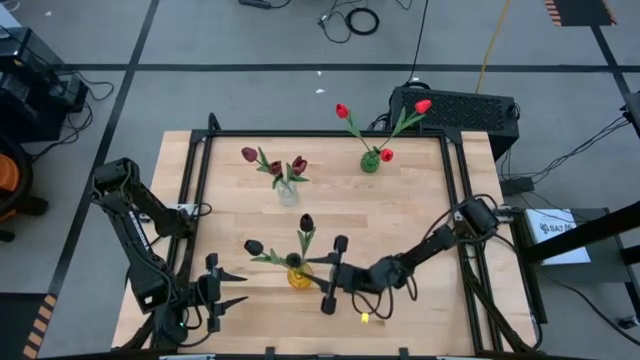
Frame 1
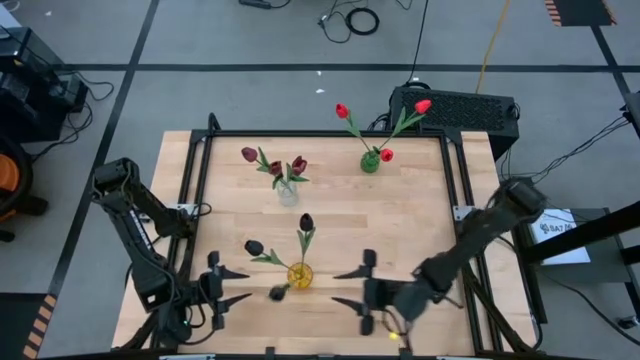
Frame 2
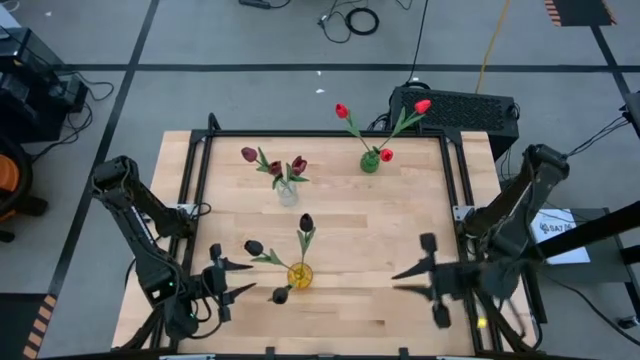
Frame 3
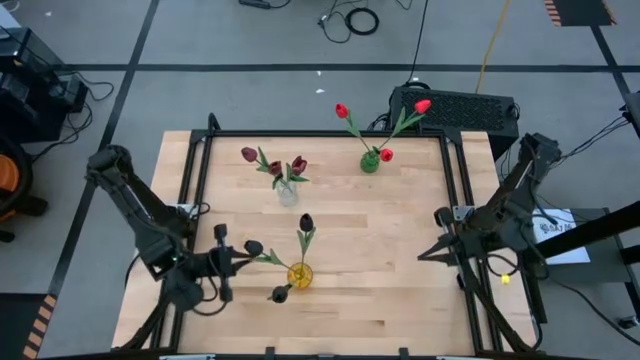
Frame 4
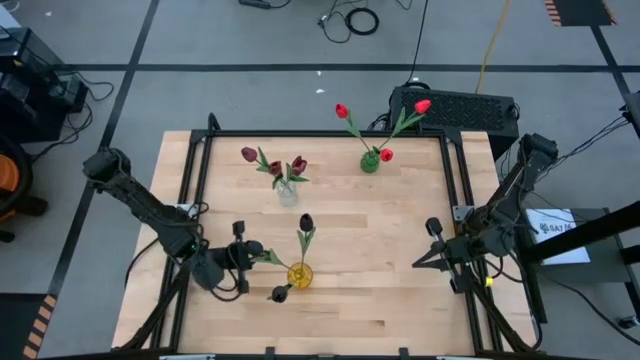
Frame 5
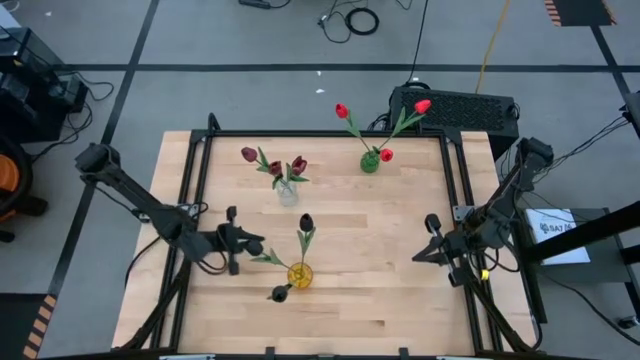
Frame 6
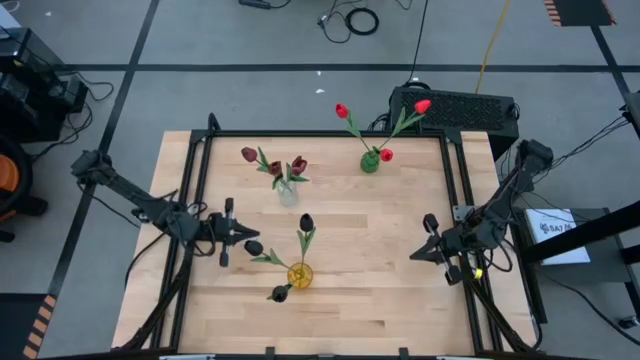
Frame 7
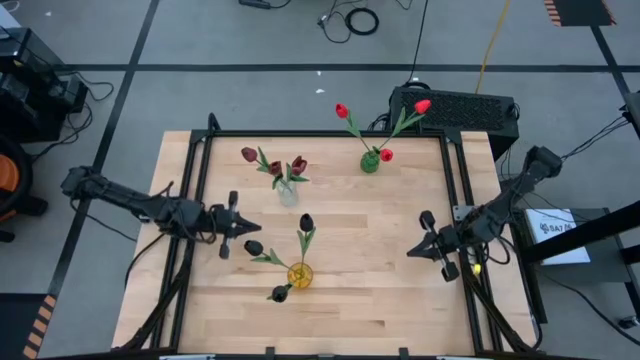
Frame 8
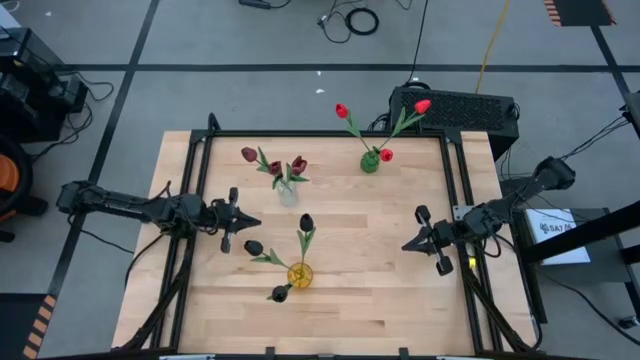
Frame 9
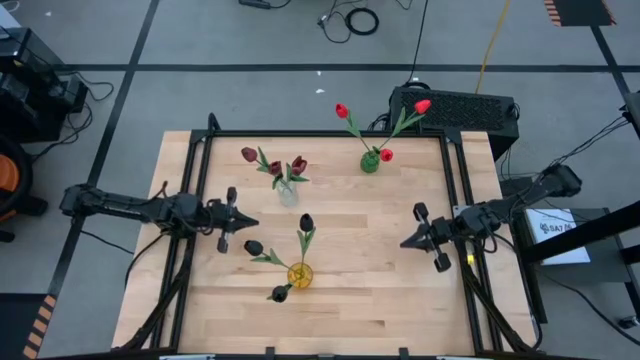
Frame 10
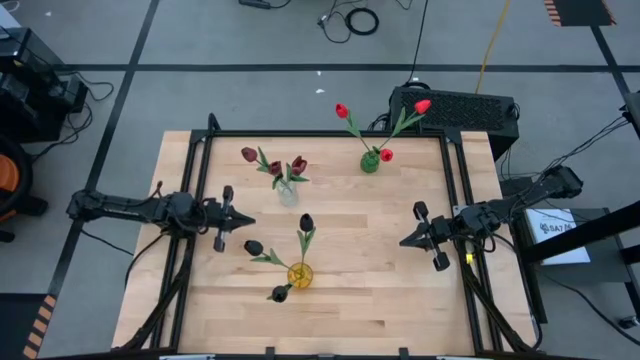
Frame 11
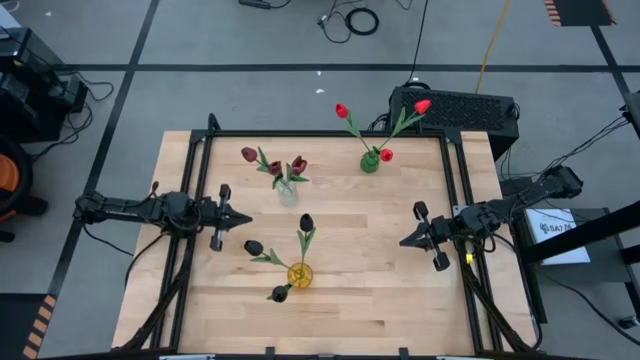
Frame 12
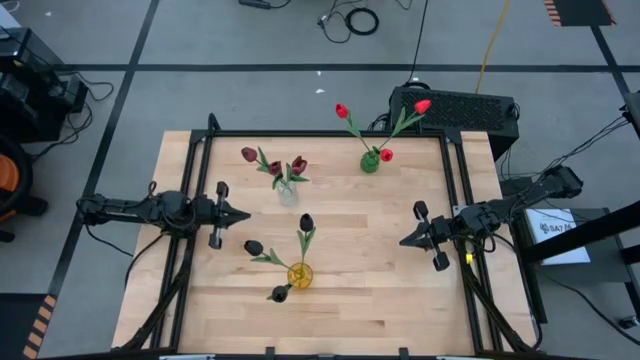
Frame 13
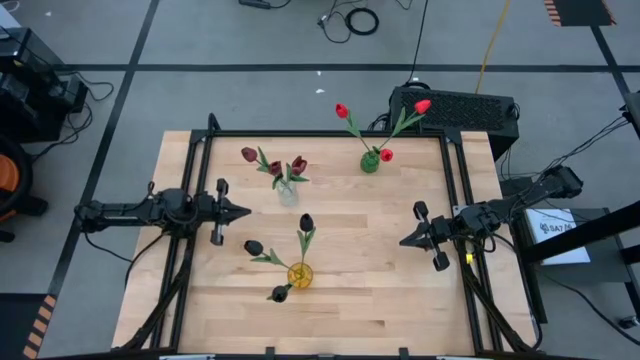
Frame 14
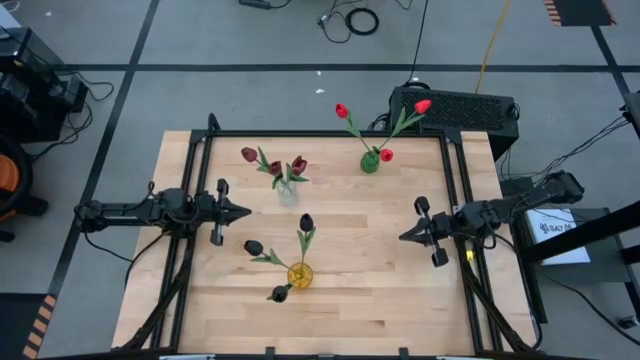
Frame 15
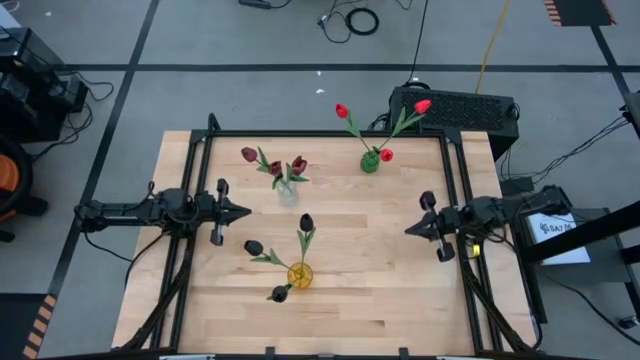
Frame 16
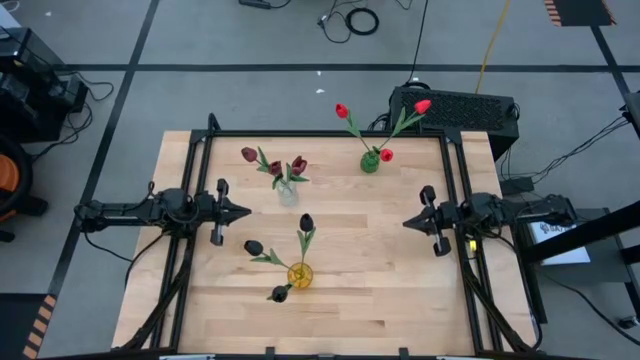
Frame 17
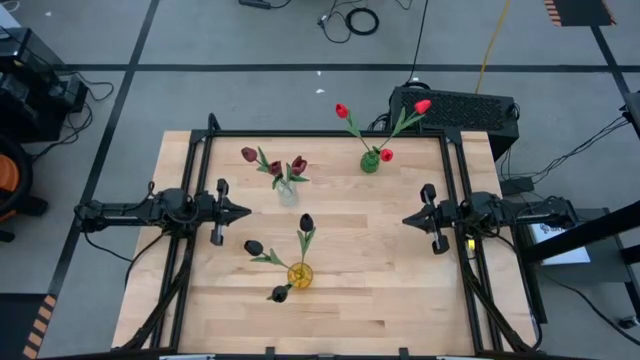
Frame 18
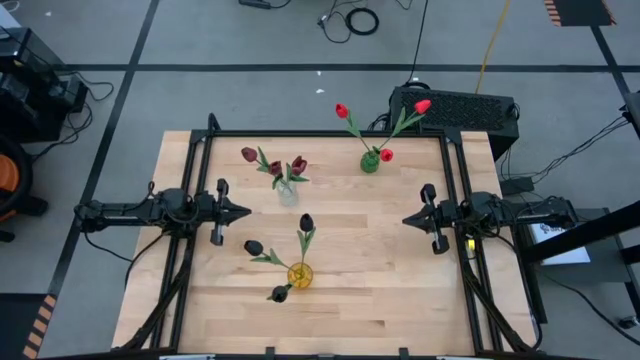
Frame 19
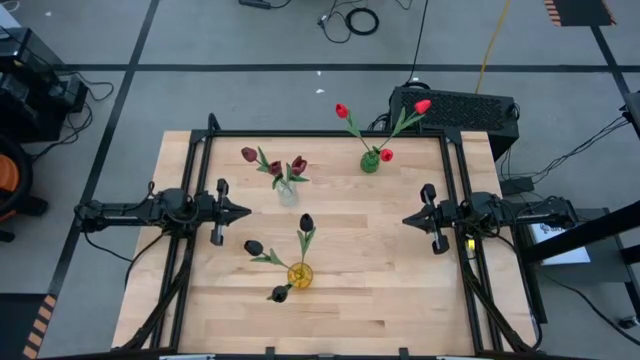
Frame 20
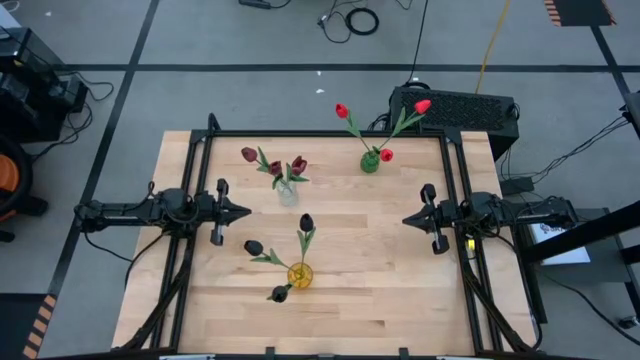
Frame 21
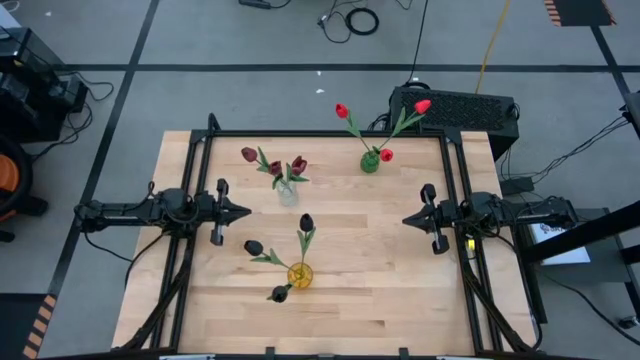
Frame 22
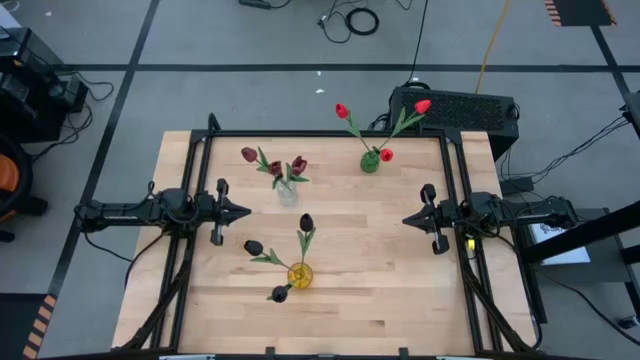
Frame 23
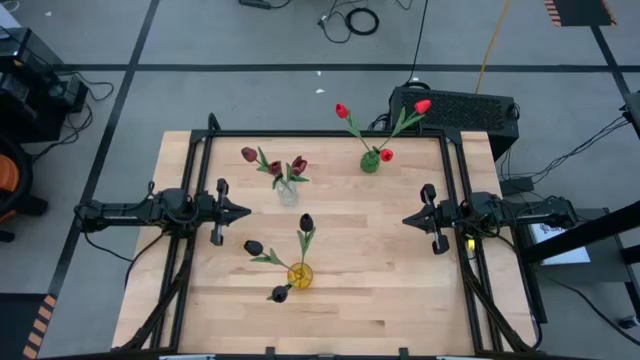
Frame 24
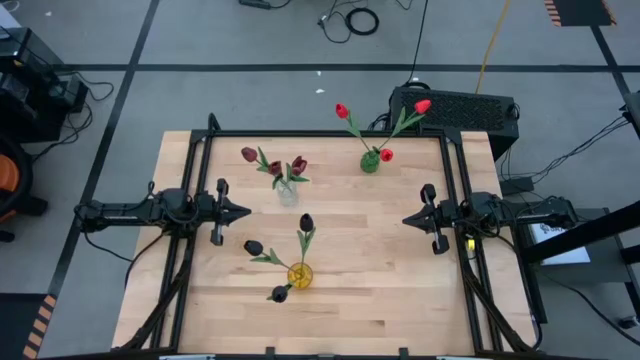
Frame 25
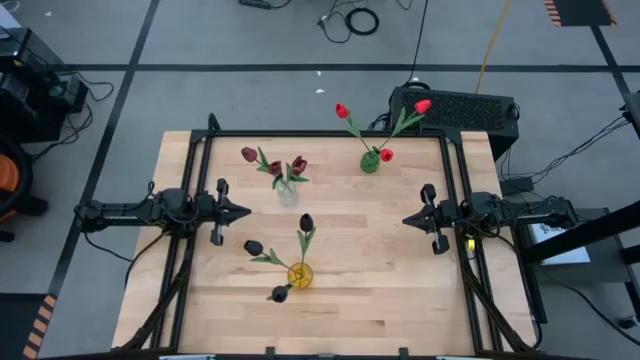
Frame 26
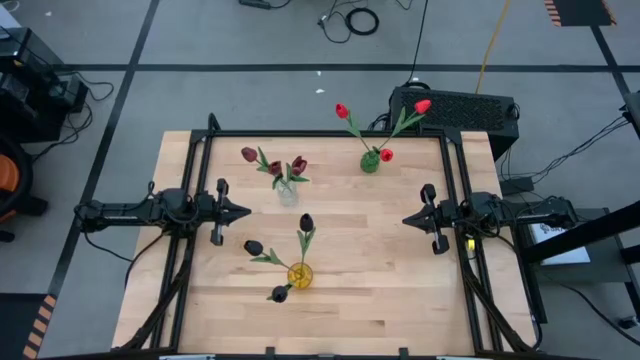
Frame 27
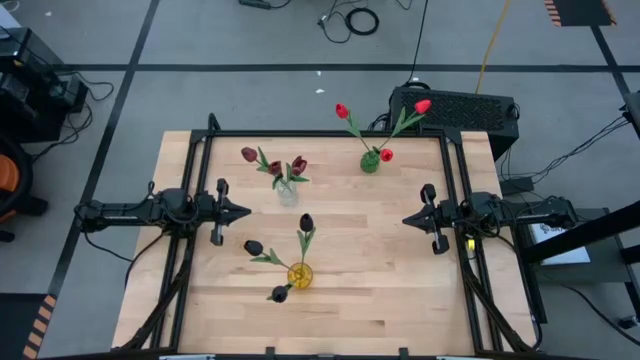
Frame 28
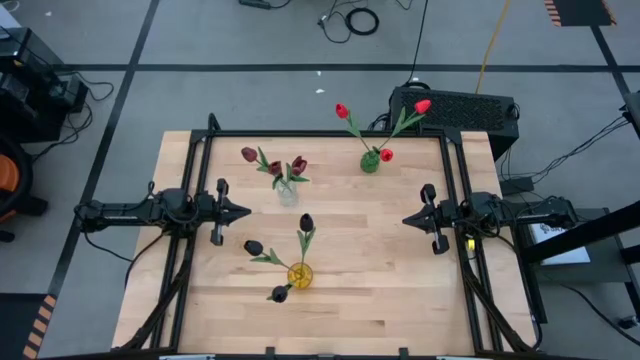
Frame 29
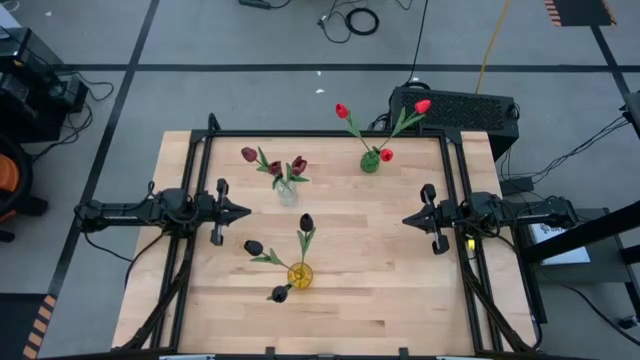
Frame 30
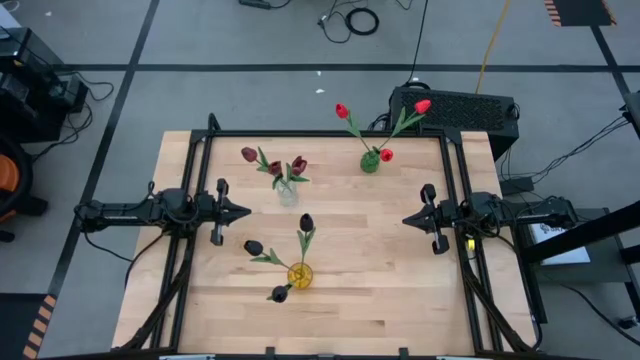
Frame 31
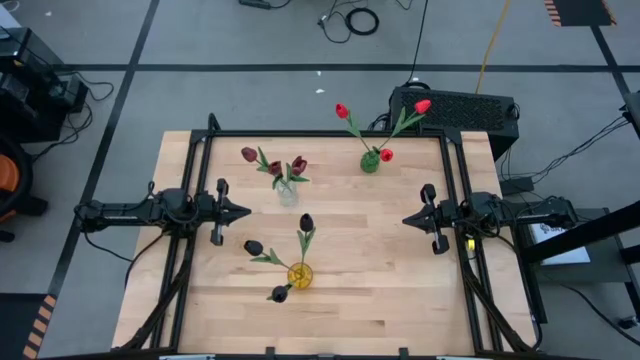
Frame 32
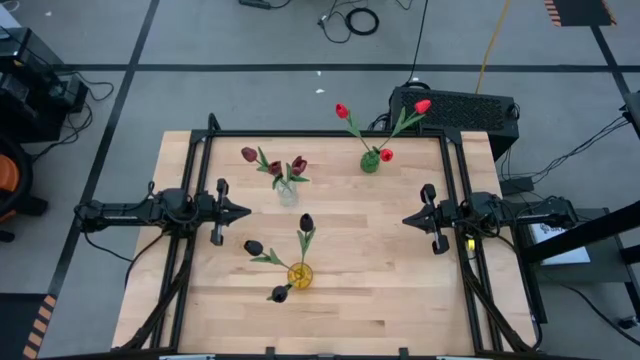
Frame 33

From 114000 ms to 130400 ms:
Task: Sort flowers into vase by color
Return to Home Position

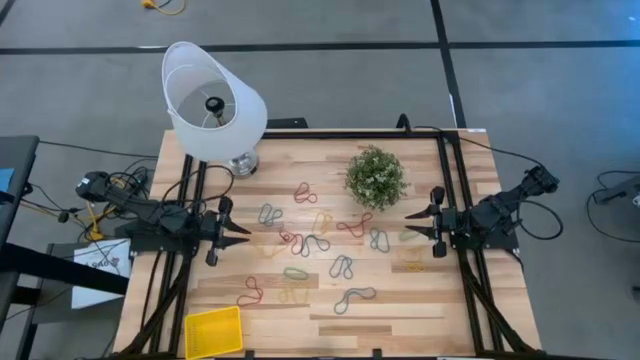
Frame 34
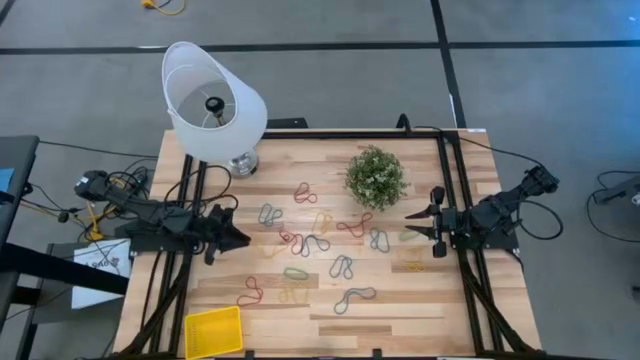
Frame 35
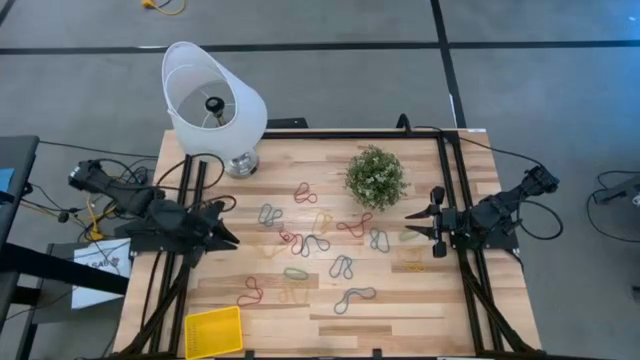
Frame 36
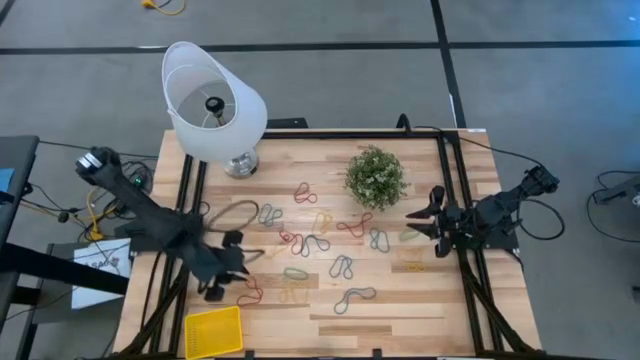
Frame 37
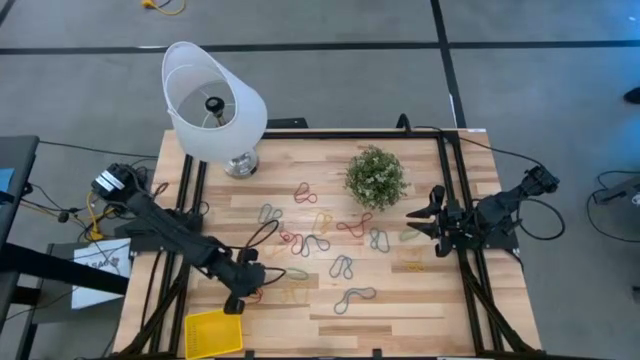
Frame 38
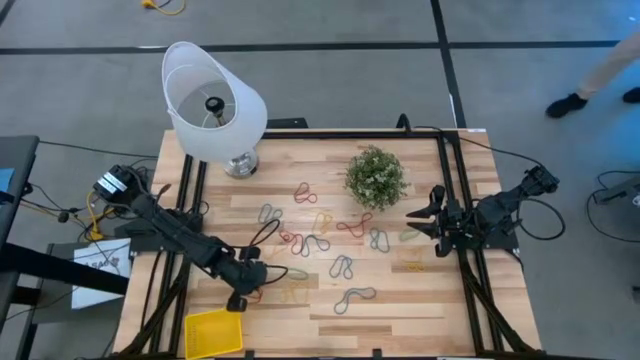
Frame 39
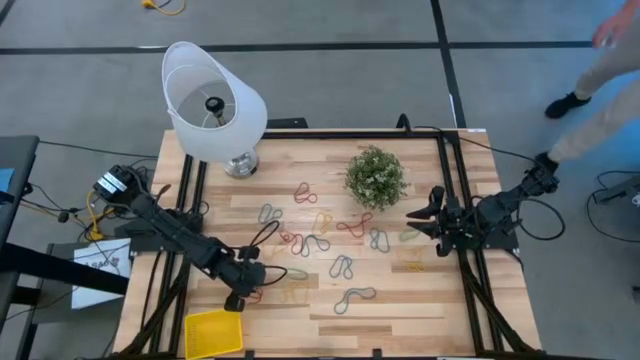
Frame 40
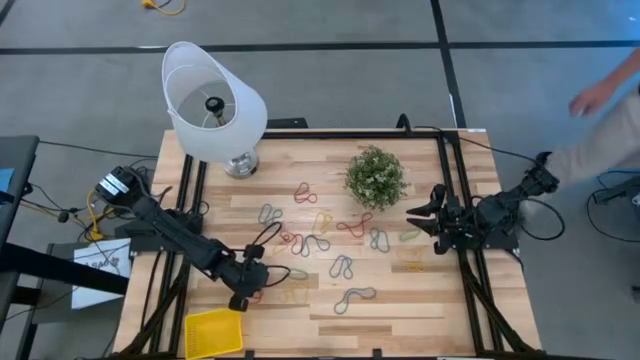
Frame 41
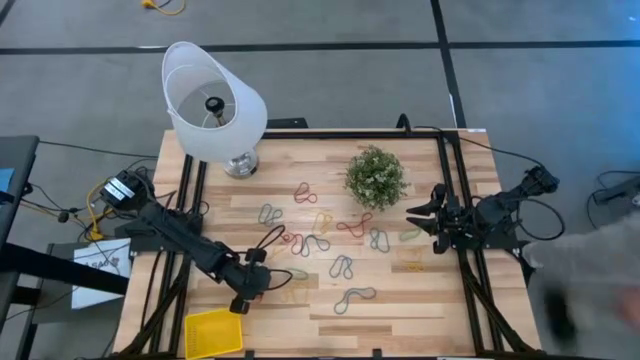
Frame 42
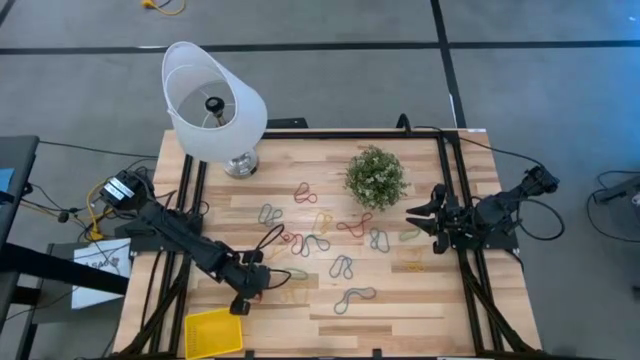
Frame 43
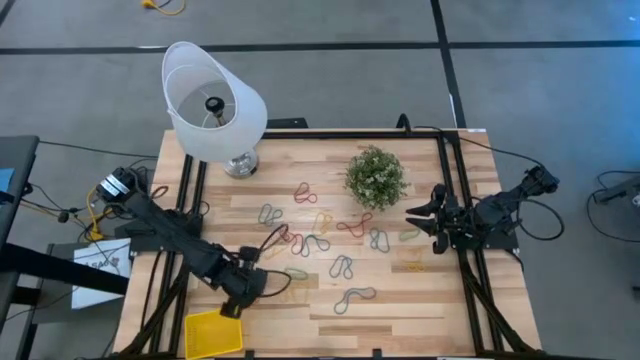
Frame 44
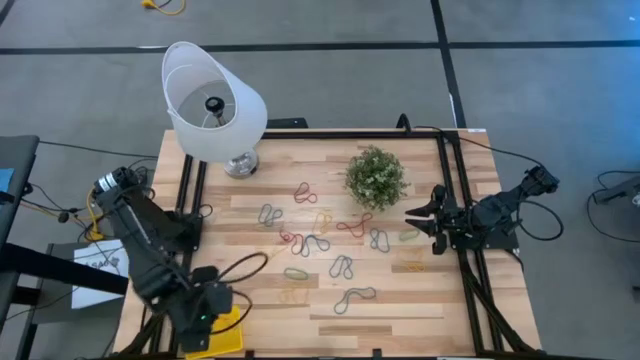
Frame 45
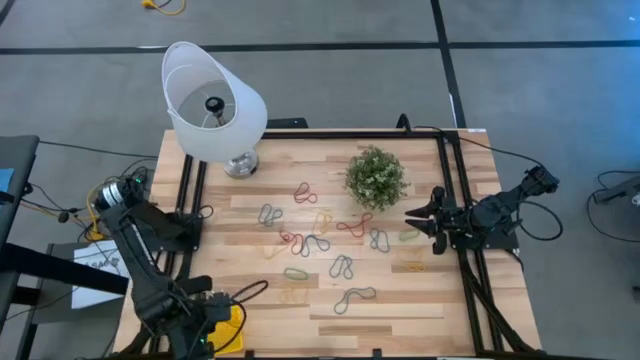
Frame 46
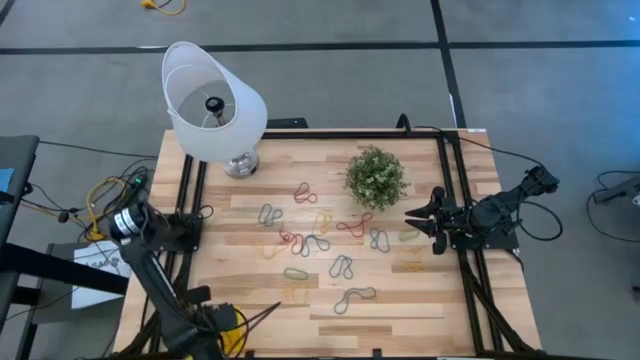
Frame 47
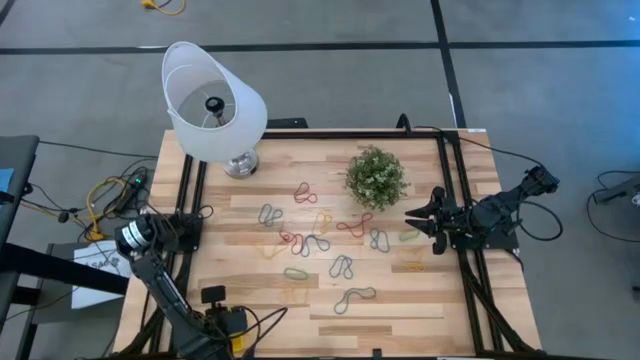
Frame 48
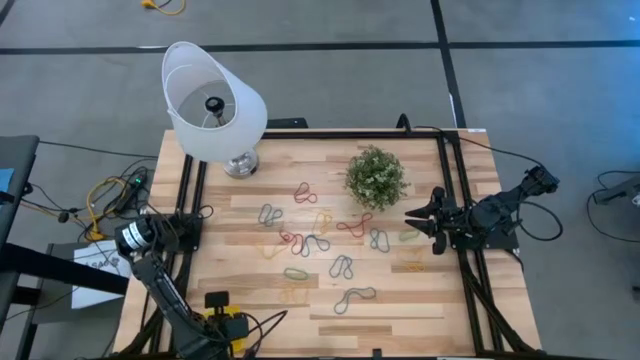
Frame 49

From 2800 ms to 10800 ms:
Task: Pick and place items into bin
Put the bottom left red rubberband into the yellow bin
